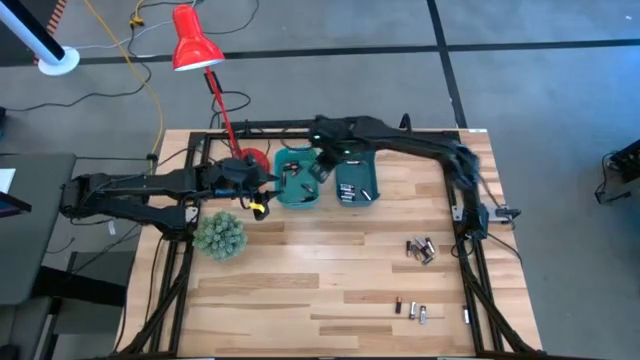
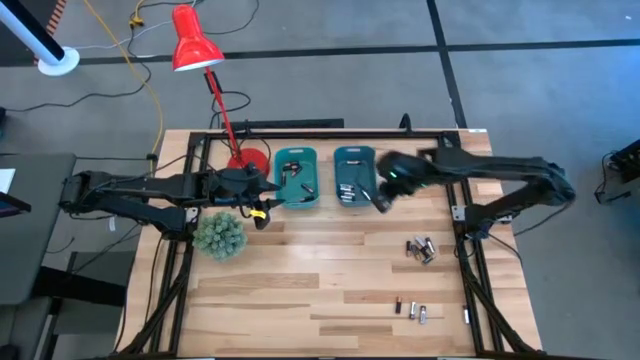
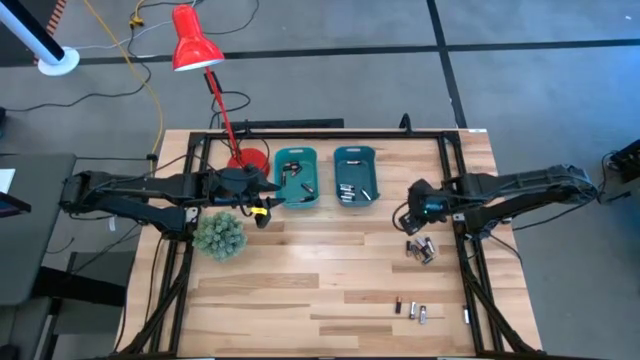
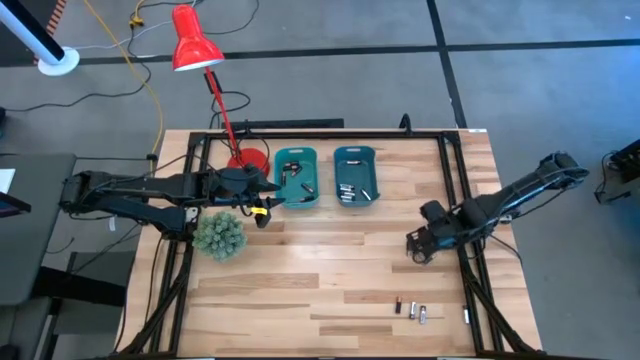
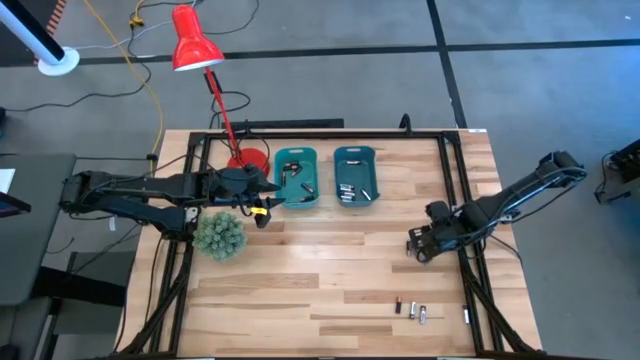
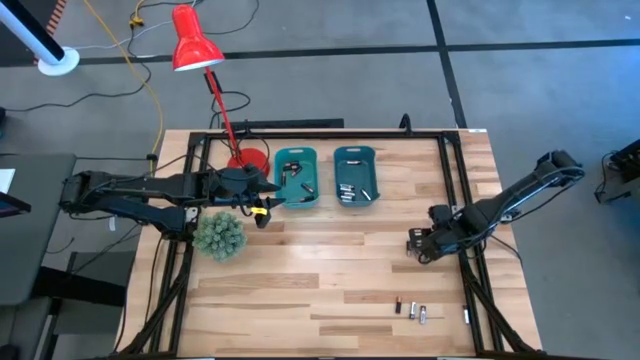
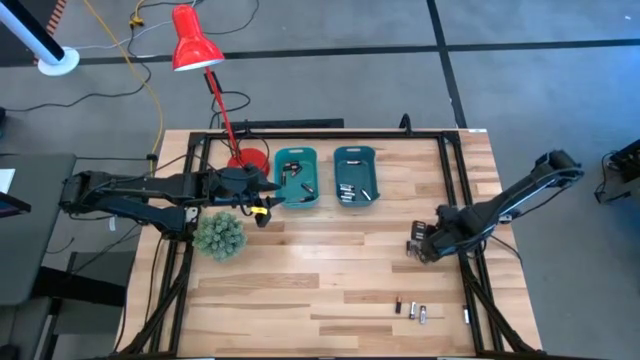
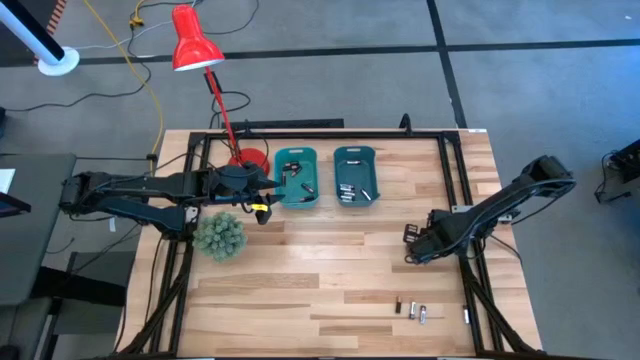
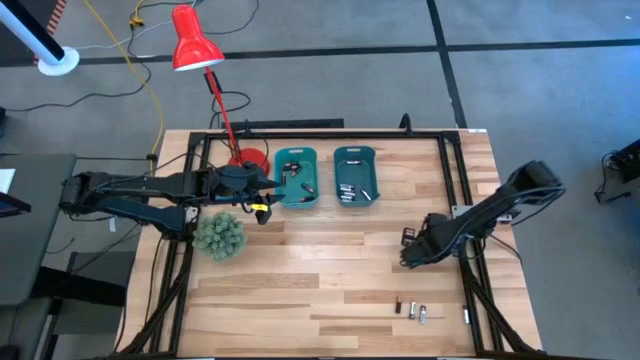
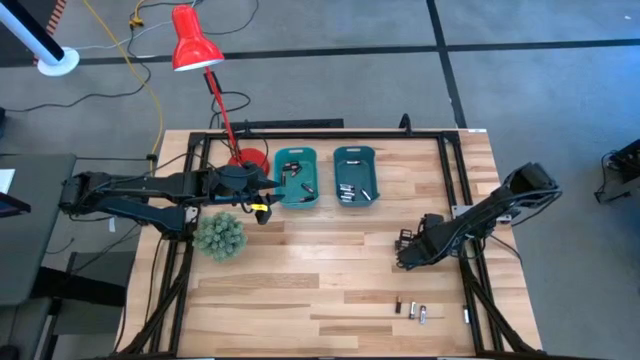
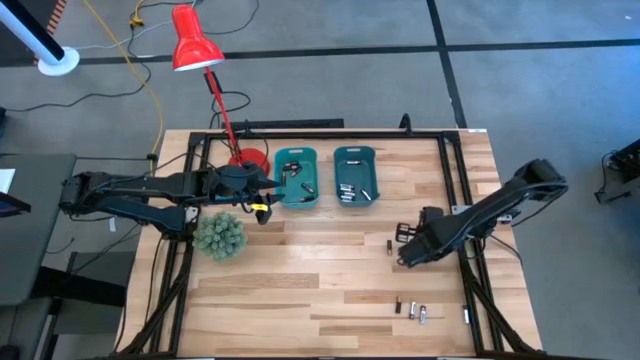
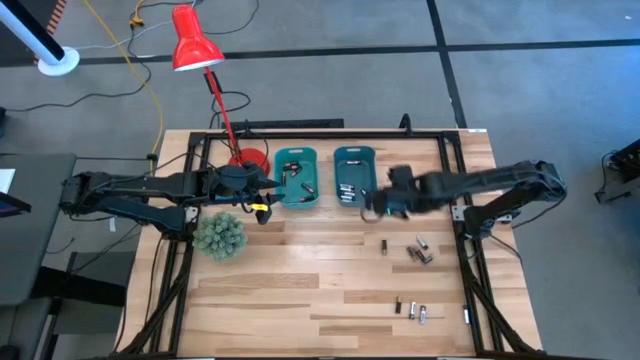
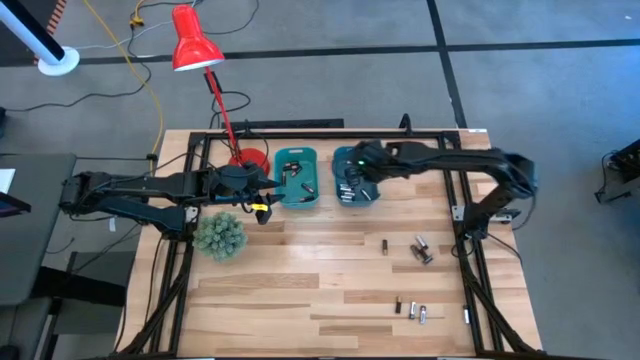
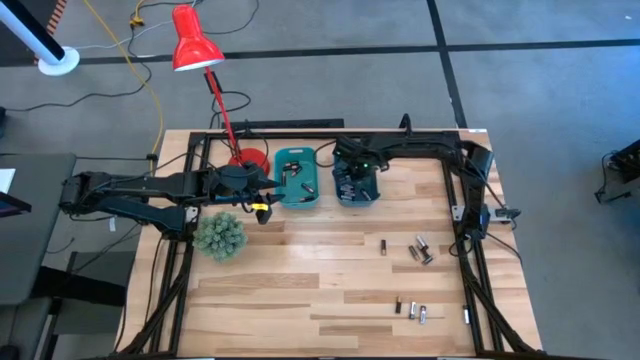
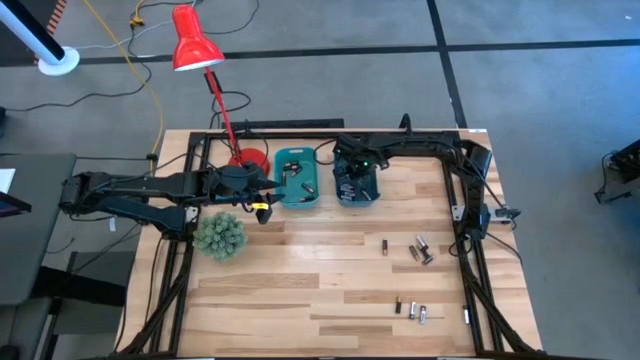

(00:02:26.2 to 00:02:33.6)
Task: Sort batteries
Put the silver battery into the blue bin

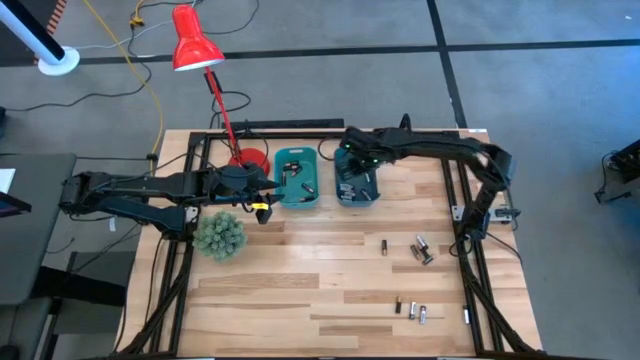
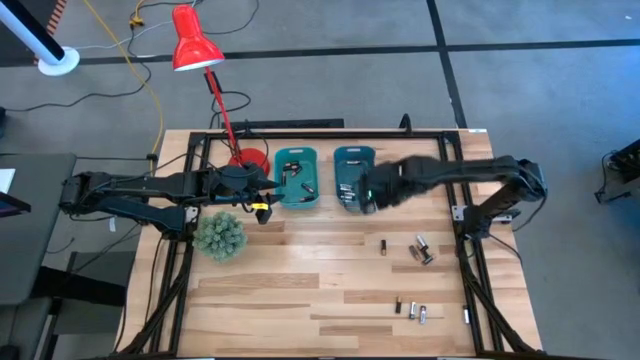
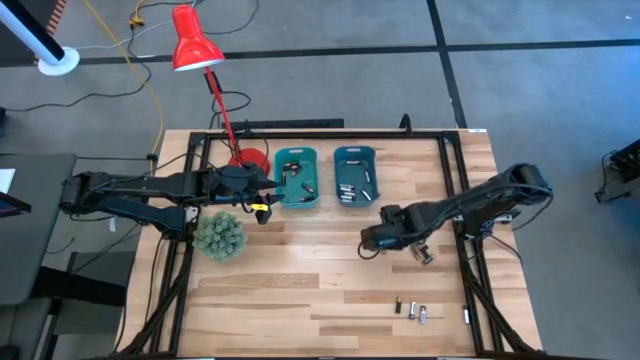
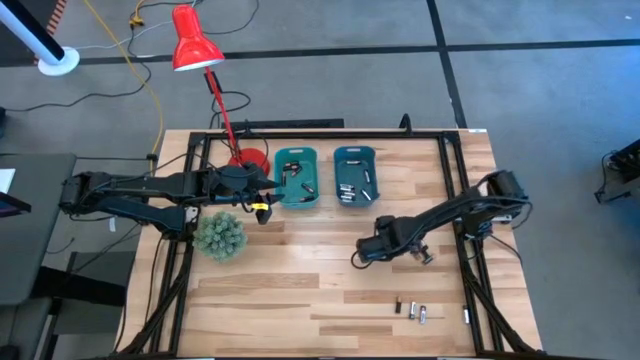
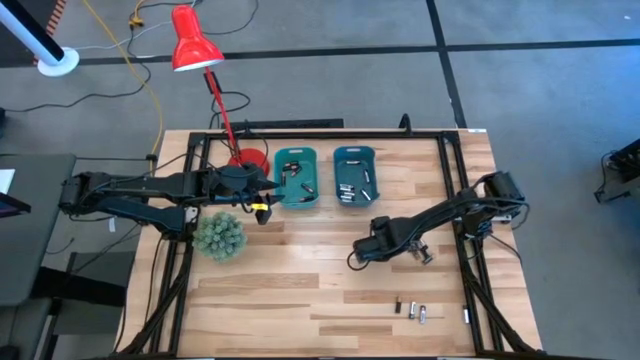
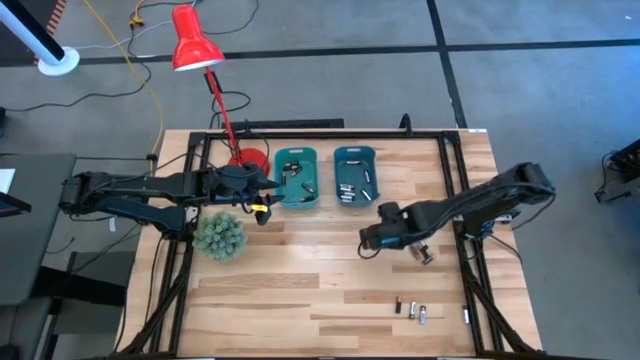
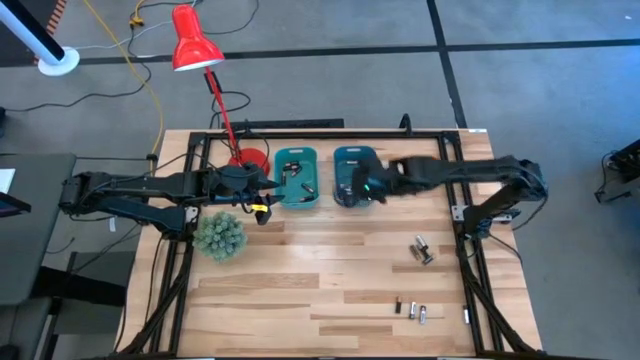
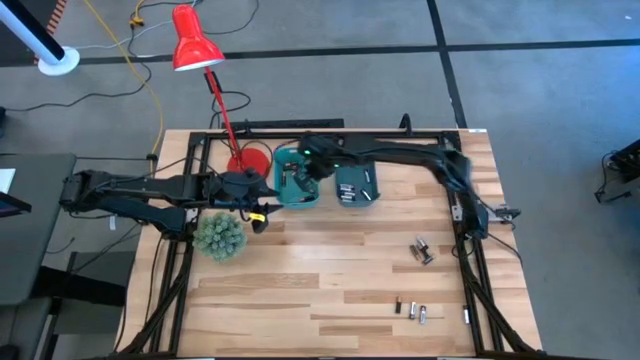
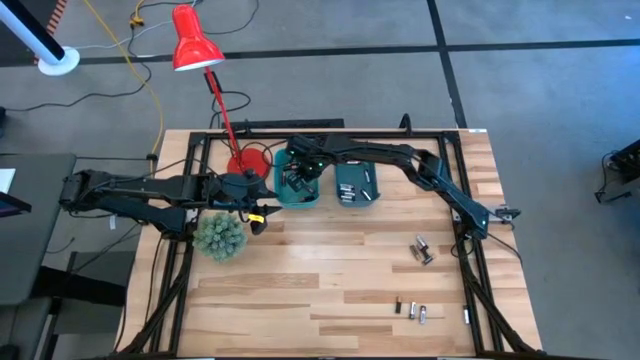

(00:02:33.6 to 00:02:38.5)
Put the black battery into the green bin

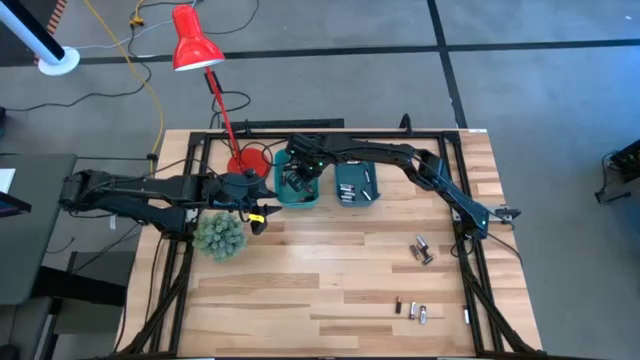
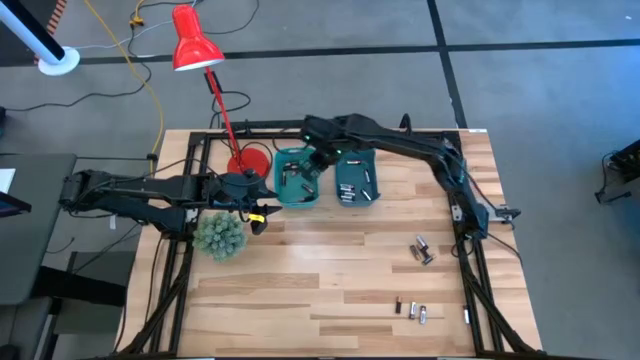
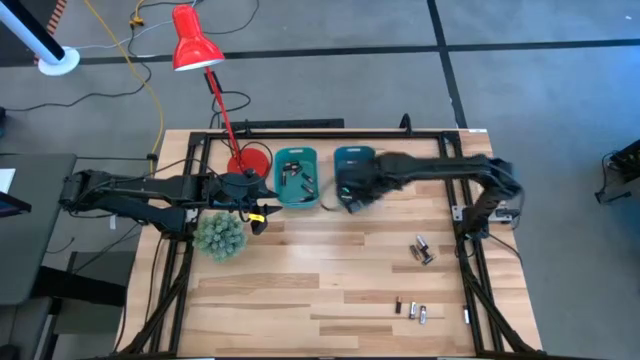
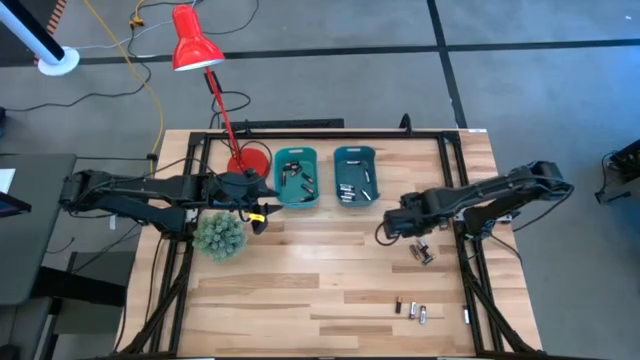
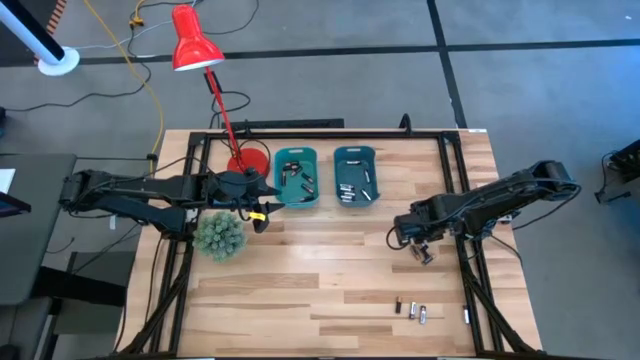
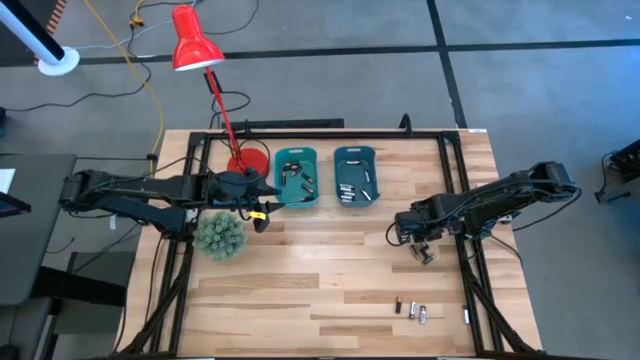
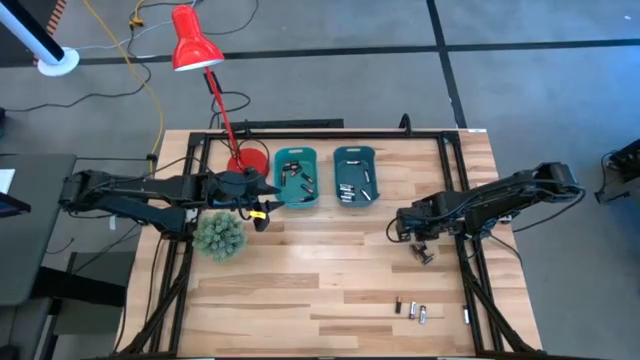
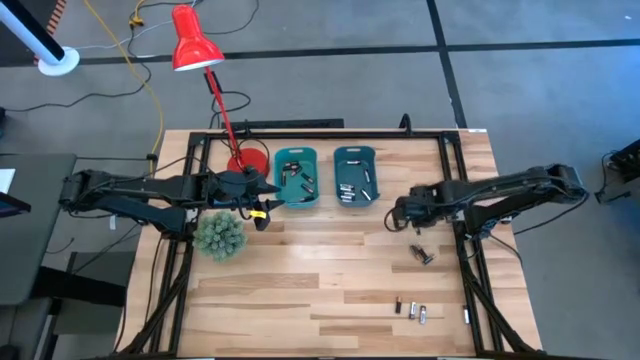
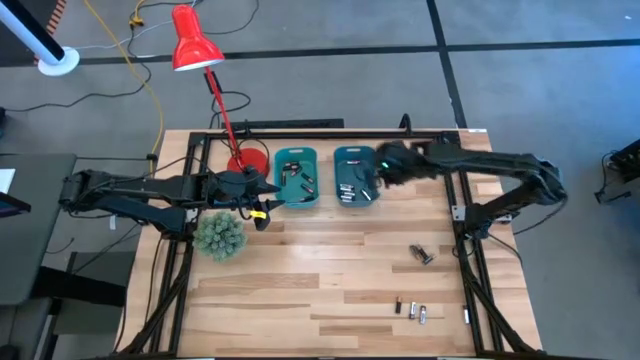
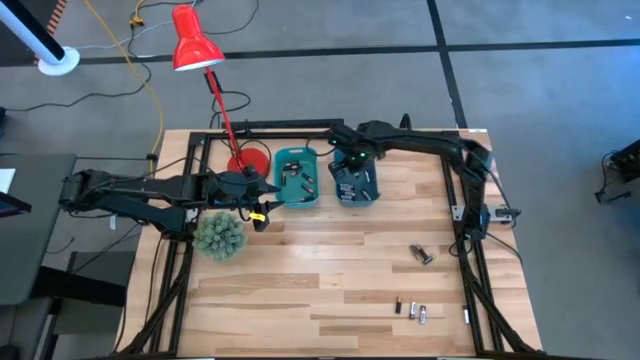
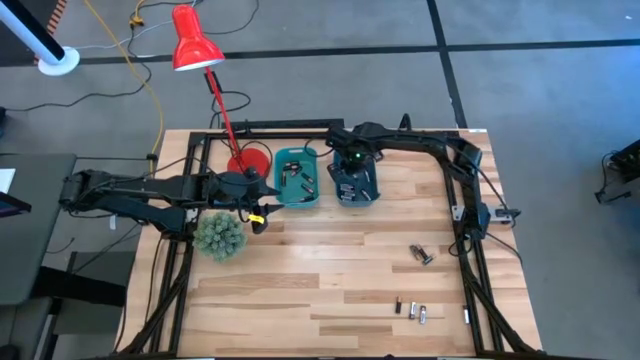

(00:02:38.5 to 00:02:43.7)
Put the silver battery into the blue bin

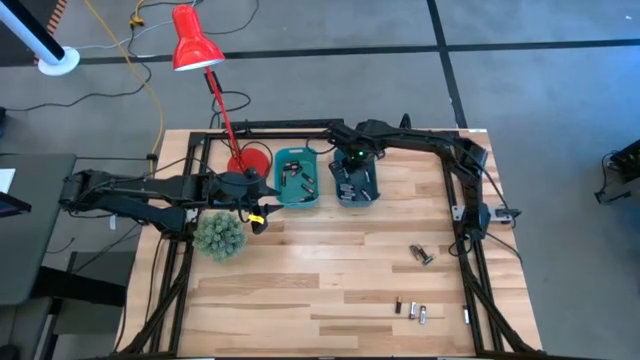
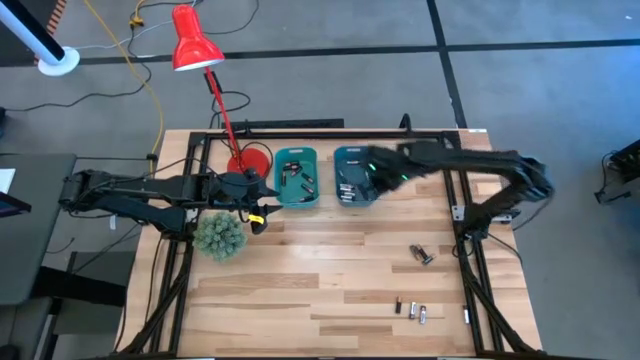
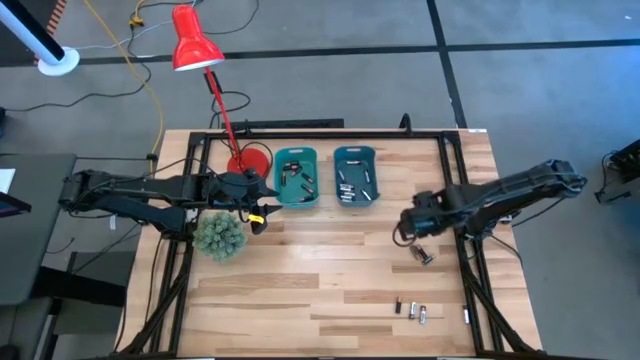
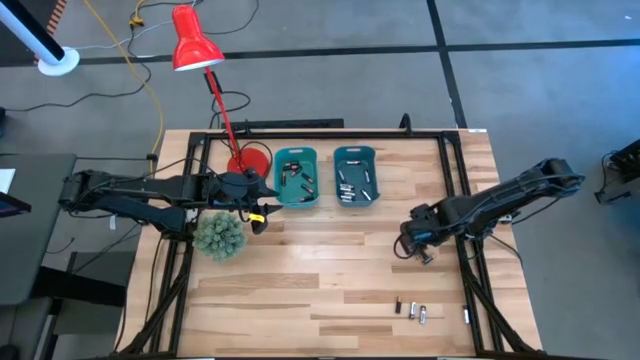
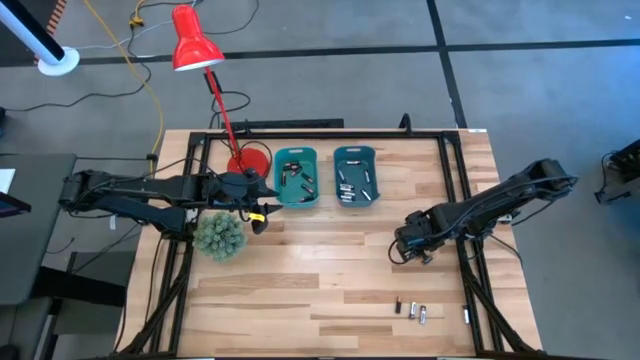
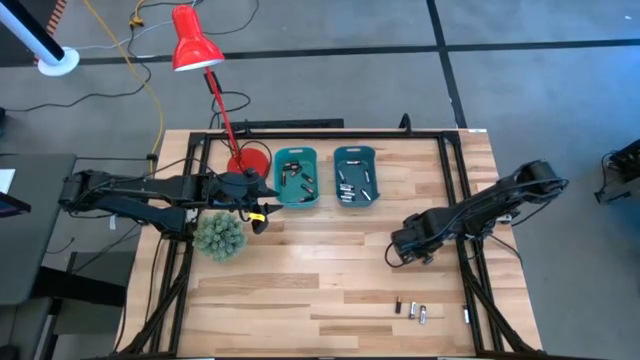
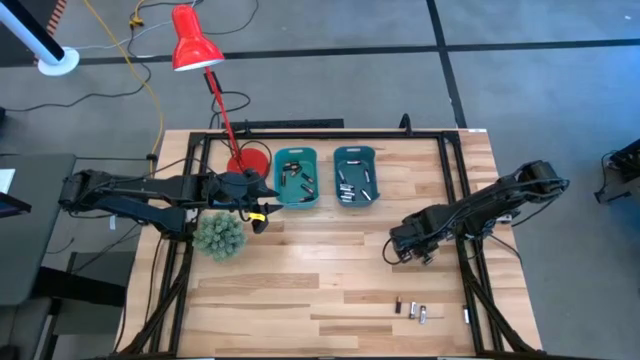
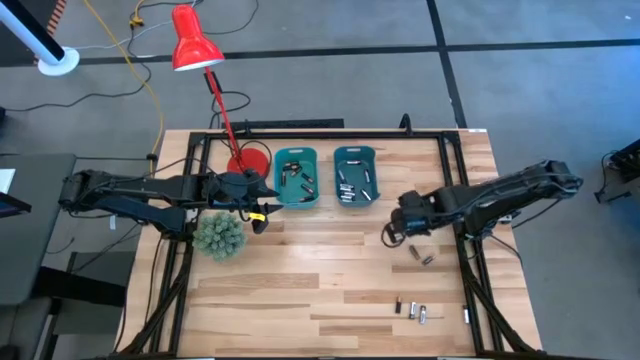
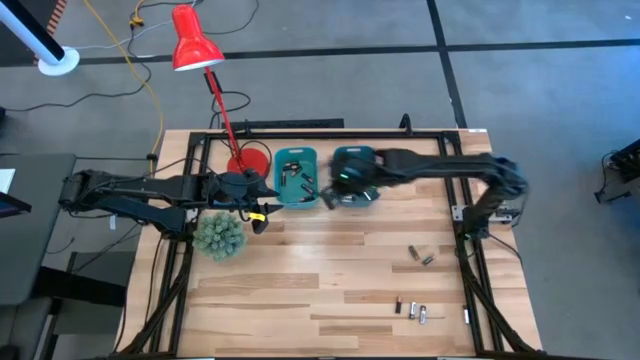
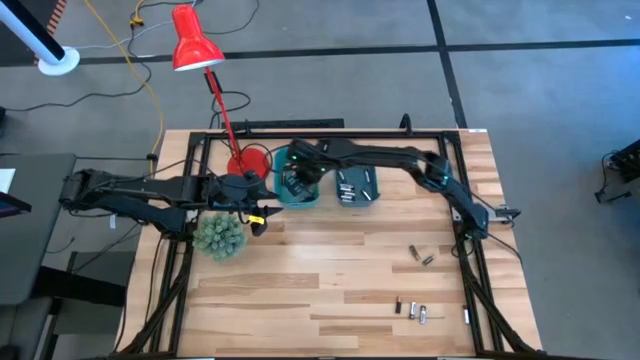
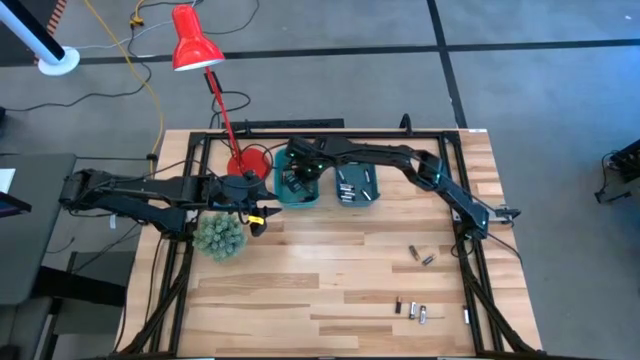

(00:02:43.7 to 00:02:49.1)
Put the black battery into the green bin
